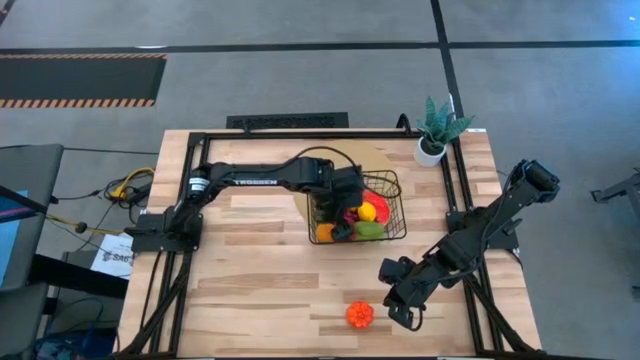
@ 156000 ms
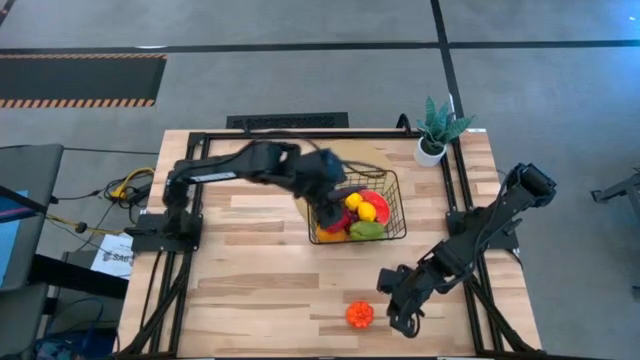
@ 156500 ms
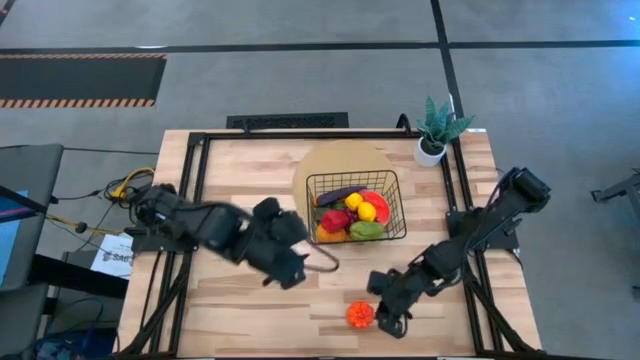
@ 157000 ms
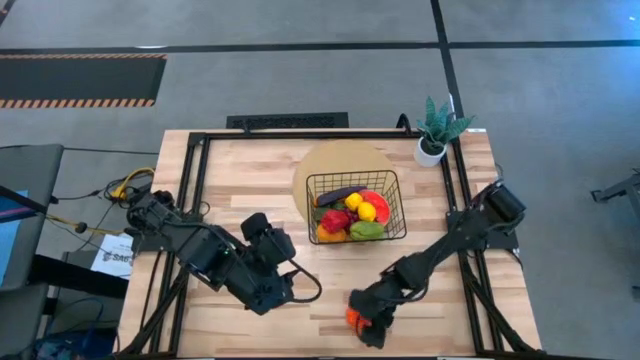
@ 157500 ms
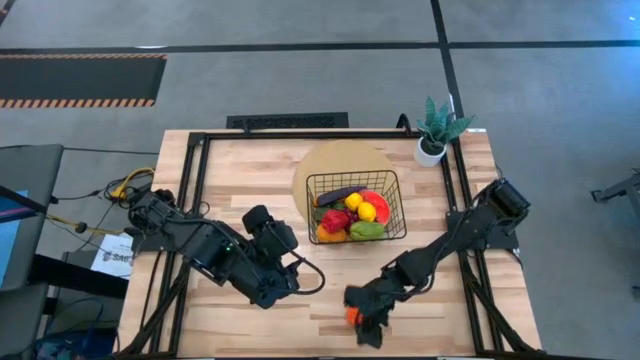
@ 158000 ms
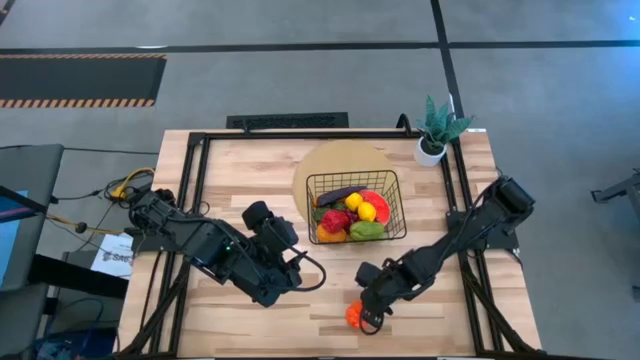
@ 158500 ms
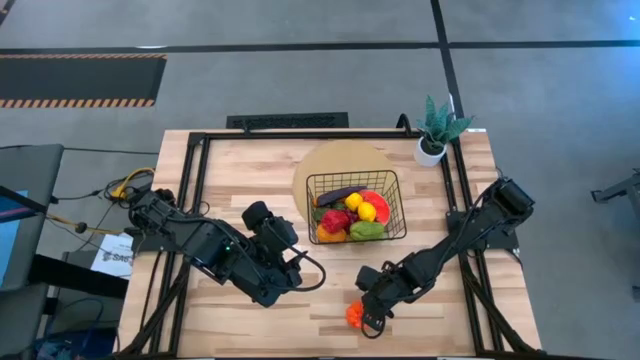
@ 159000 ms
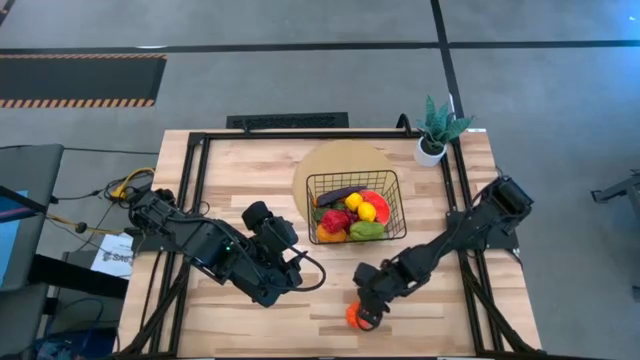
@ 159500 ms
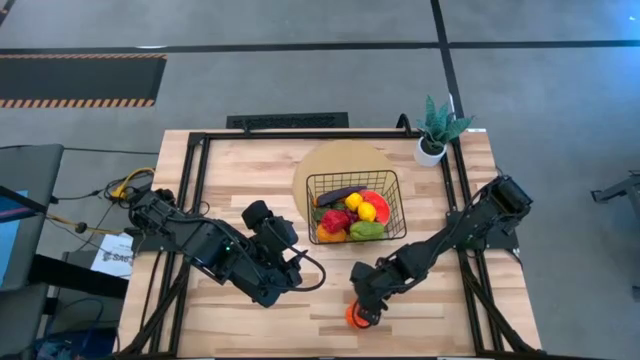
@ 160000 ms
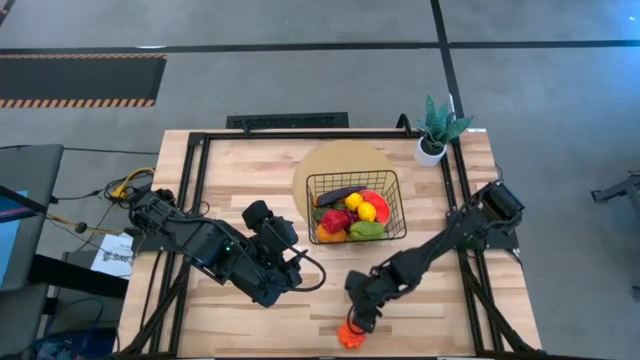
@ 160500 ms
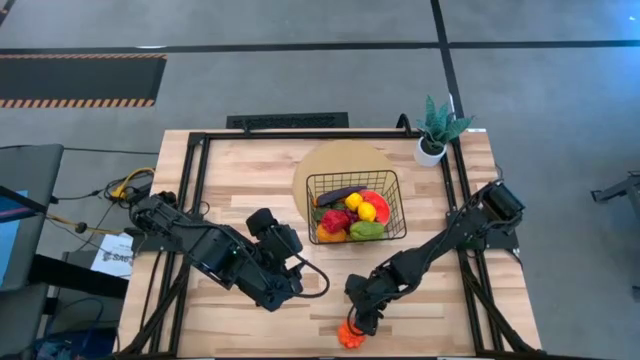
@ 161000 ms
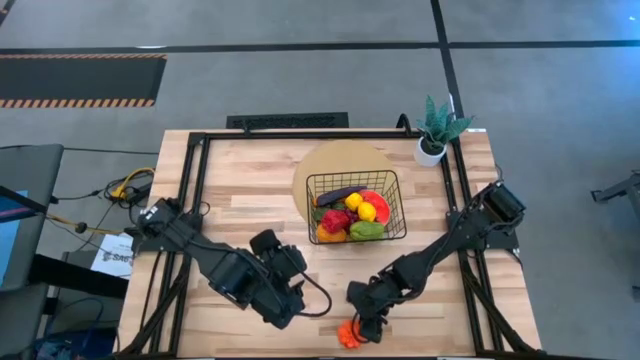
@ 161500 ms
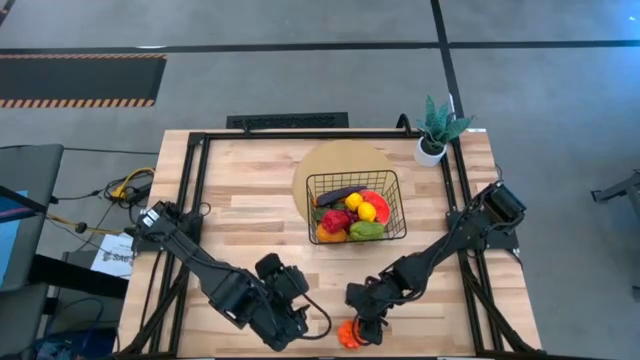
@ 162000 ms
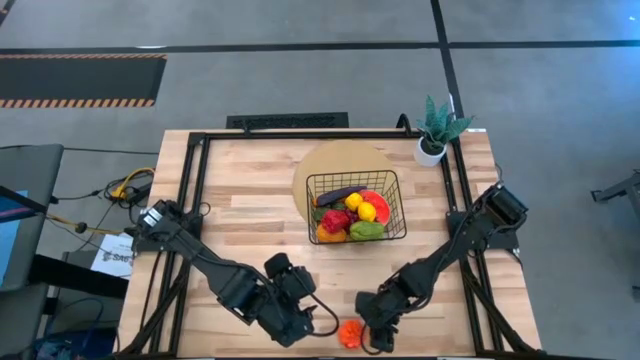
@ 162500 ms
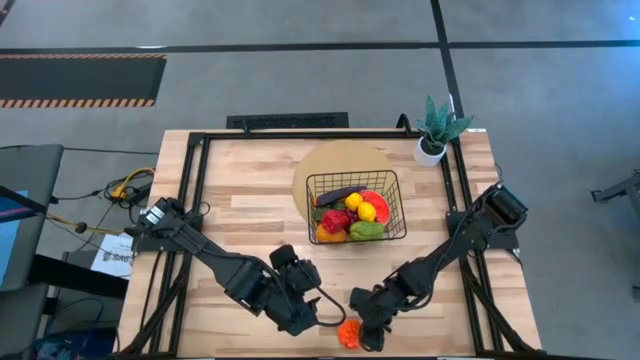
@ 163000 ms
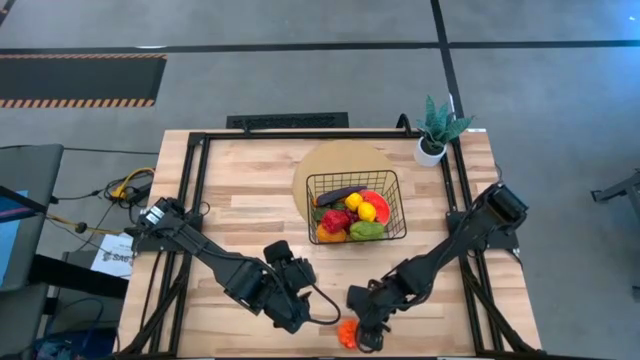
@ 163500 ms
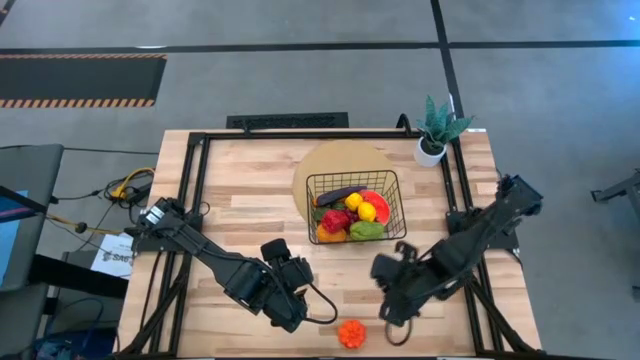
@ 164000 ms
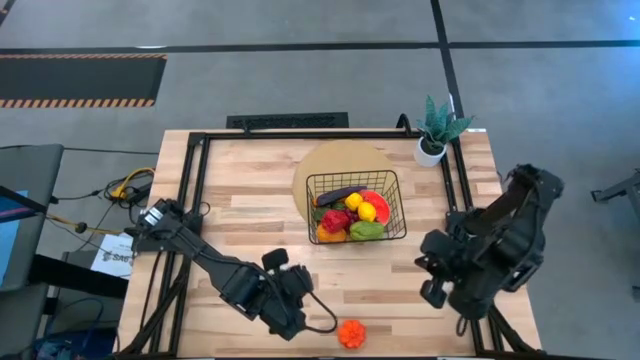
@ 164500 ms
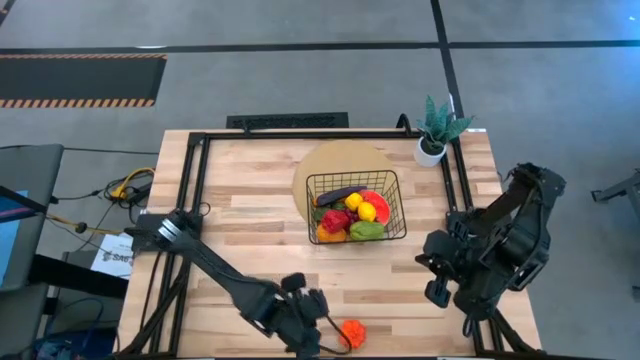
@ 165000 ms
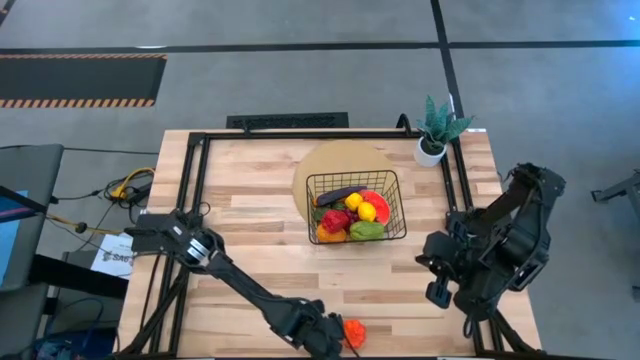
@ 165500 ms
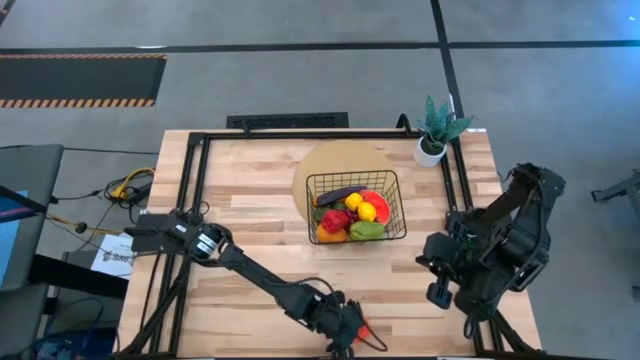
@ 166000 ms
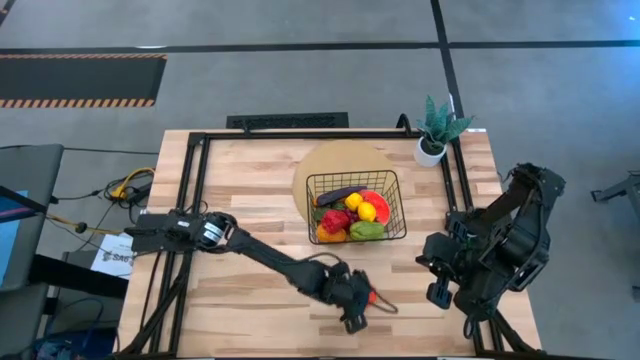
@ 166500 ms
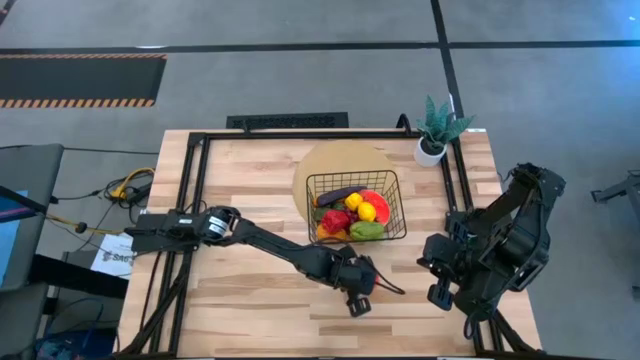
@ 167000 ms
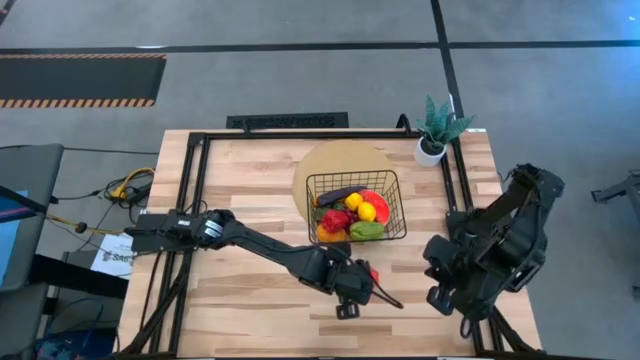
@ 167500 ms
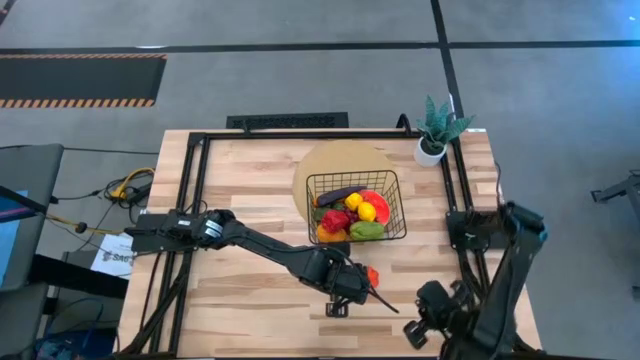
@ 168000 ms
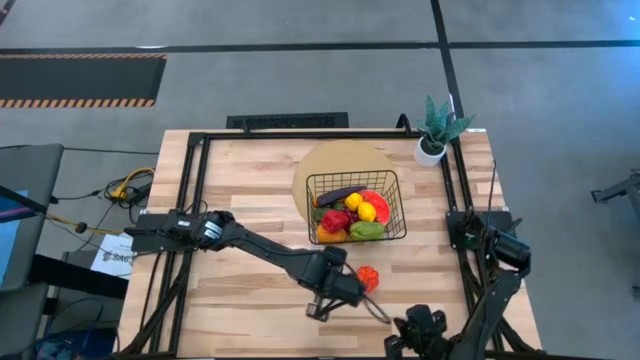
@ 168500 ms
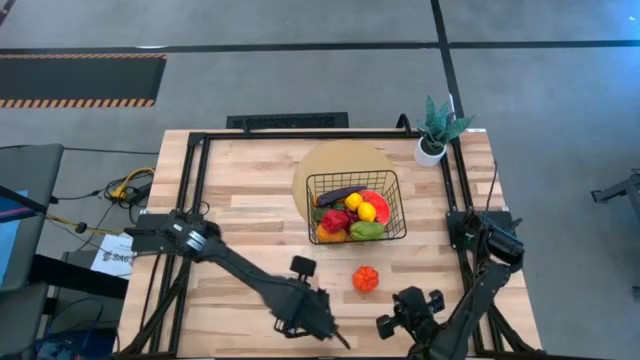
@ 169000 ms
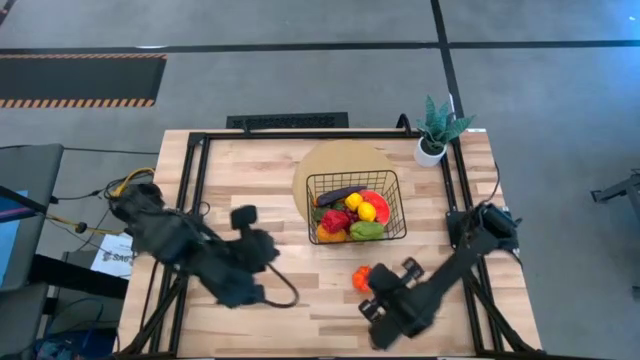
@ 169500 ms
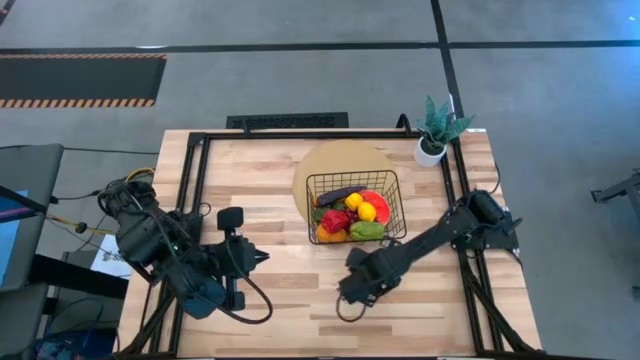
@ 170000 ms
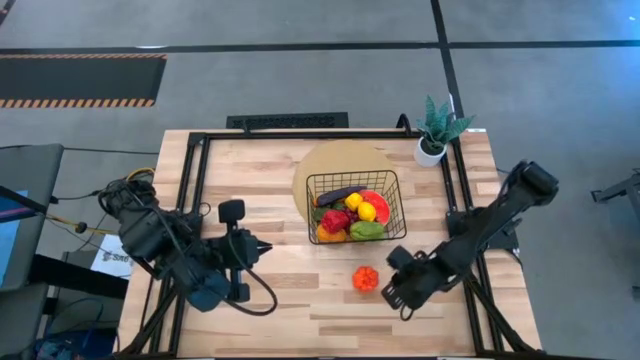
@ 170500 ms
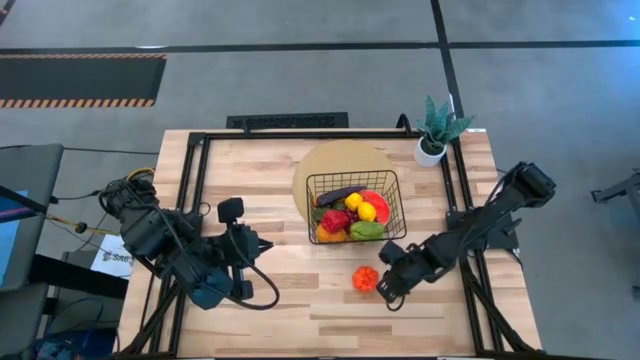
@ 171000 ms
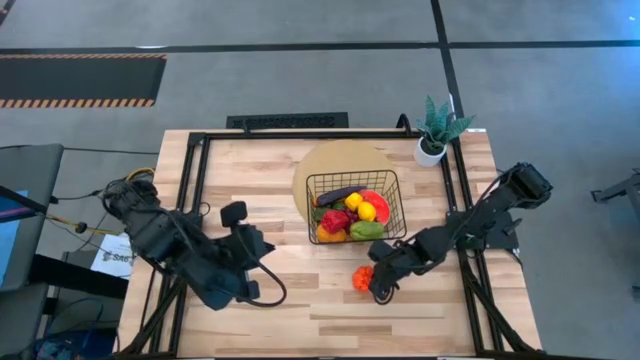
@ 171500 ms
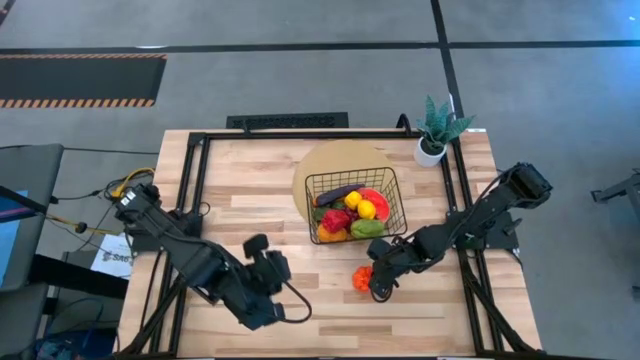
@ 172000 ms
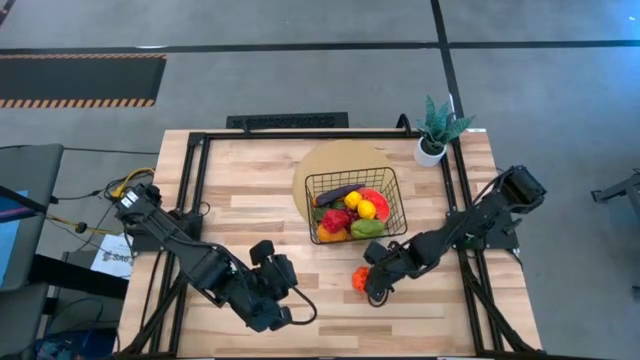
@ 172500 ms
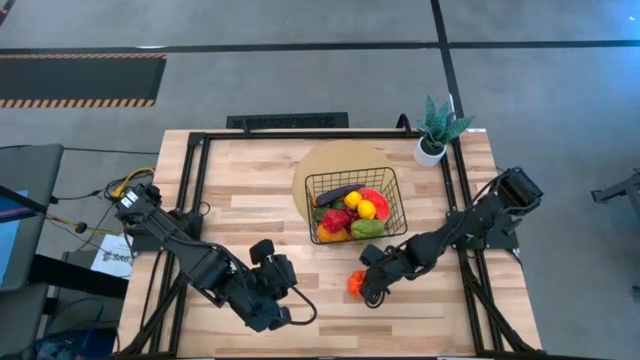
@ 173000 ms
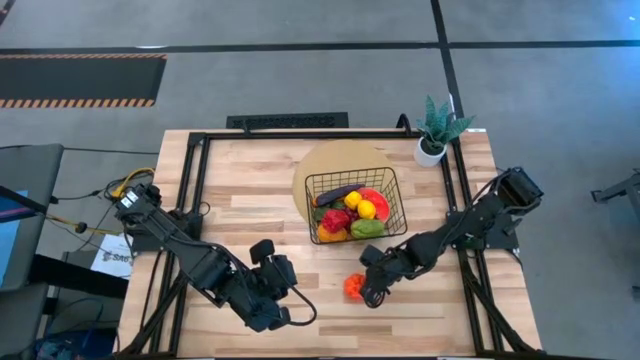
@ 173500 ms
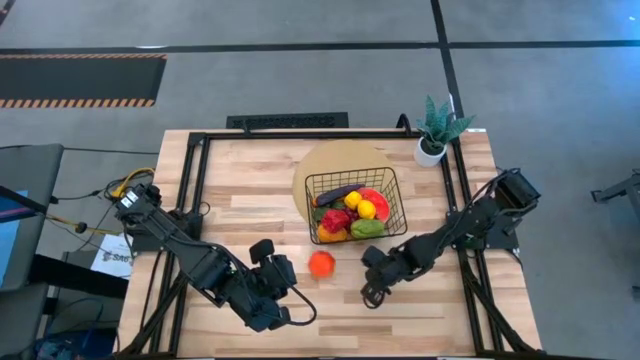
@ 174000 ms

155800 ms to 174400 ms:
Task: Build produce basket
Put the orange pumpkin into the wire basket

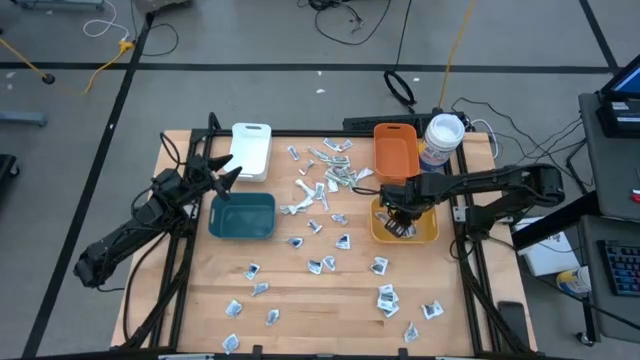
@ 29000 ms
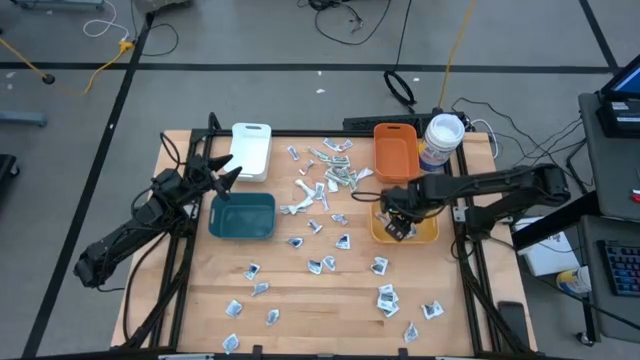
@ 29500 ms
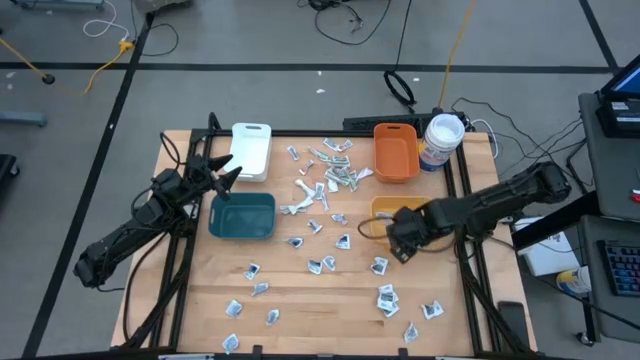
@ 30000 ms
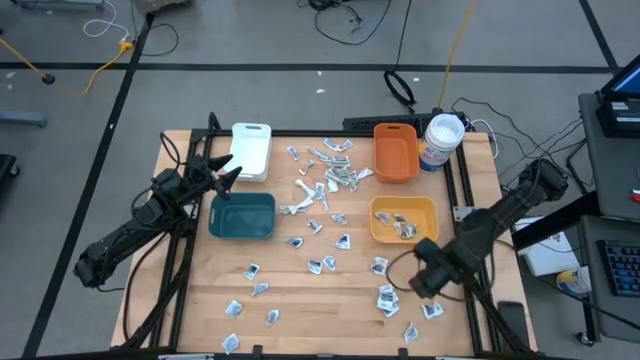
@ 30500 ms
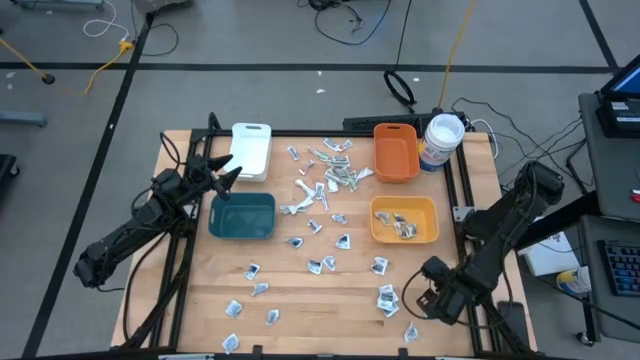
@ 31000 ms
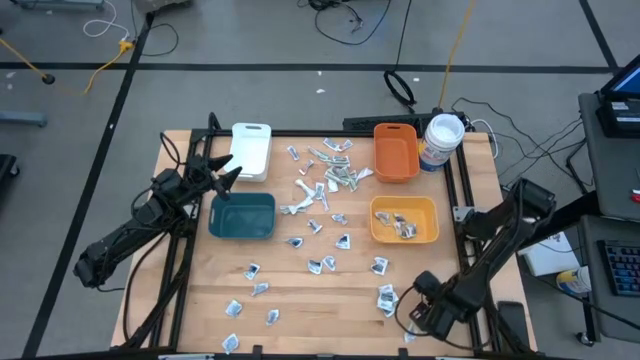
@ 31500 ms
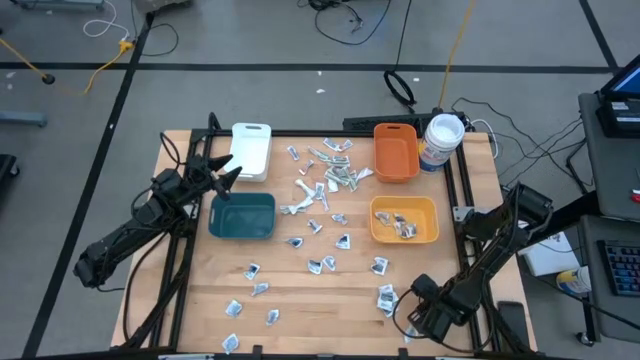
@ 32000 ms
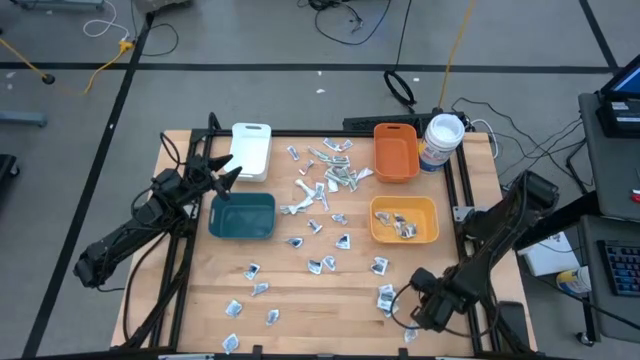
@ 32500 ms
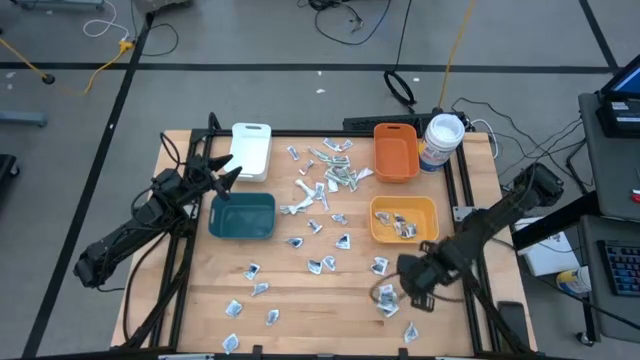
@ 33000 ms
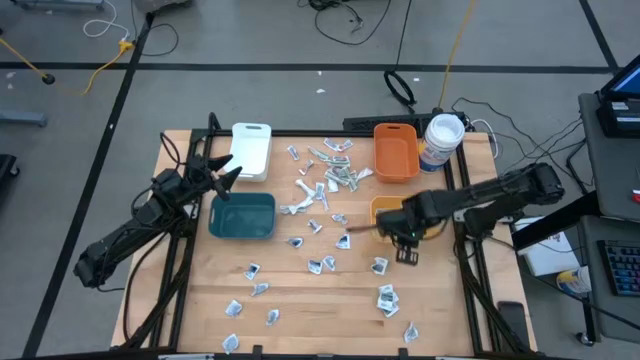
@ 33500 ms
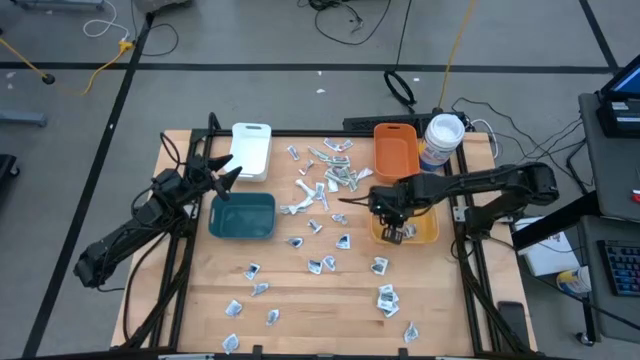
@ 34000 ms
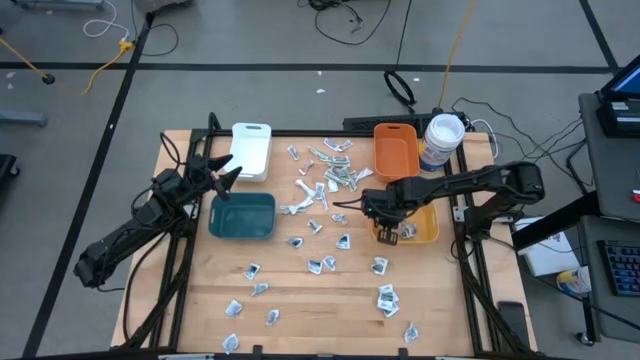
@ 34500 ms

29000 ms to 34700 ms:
Task: Pick & Place First Aid Supplies
Put the antiseptic towelette into the yellow bin
